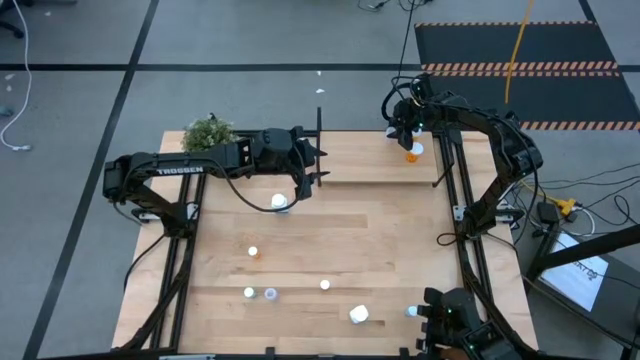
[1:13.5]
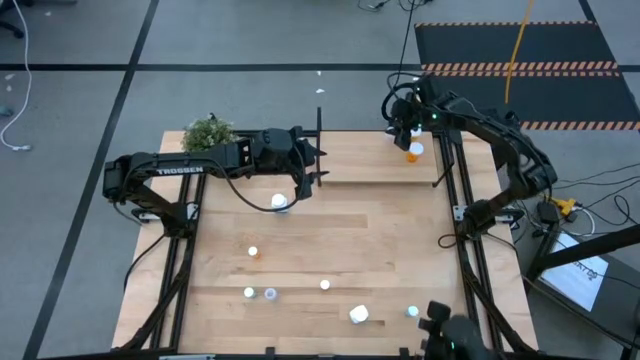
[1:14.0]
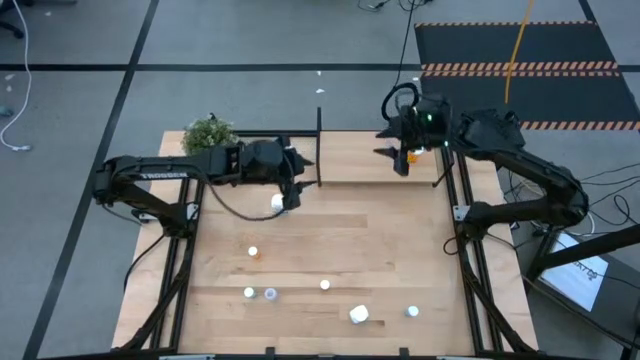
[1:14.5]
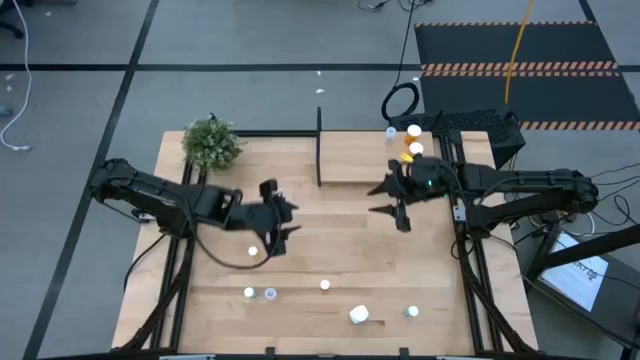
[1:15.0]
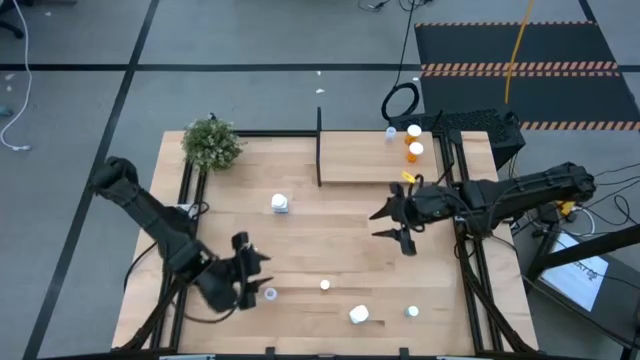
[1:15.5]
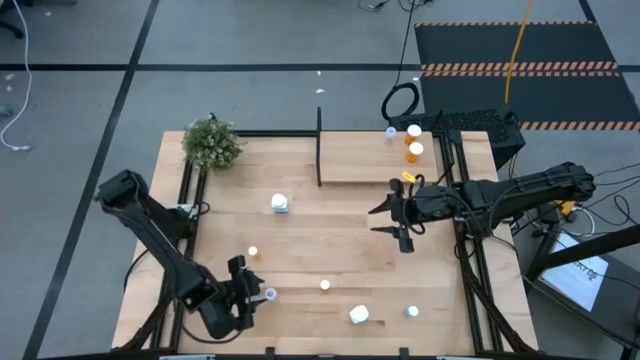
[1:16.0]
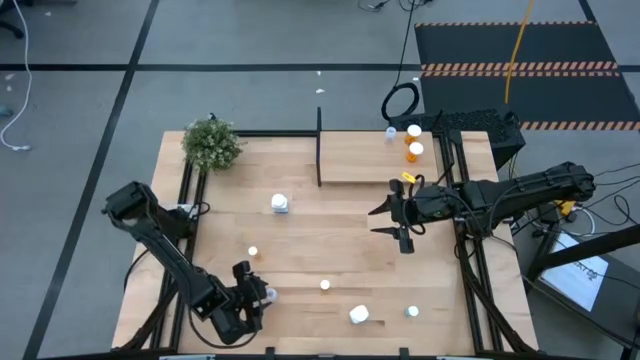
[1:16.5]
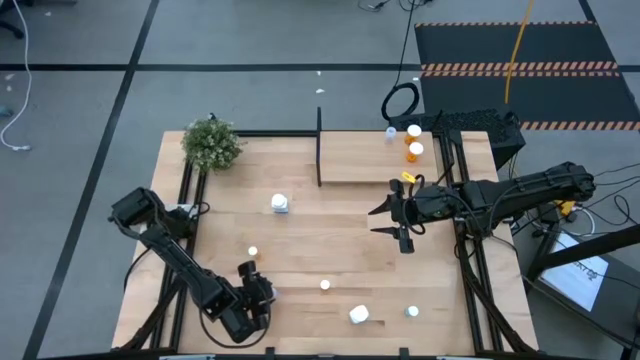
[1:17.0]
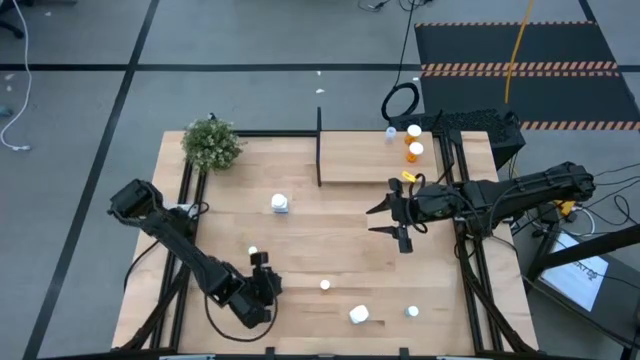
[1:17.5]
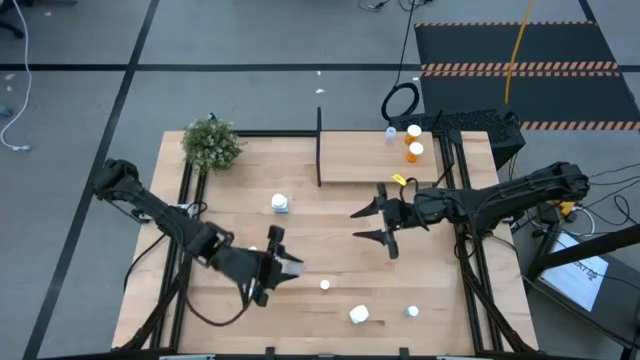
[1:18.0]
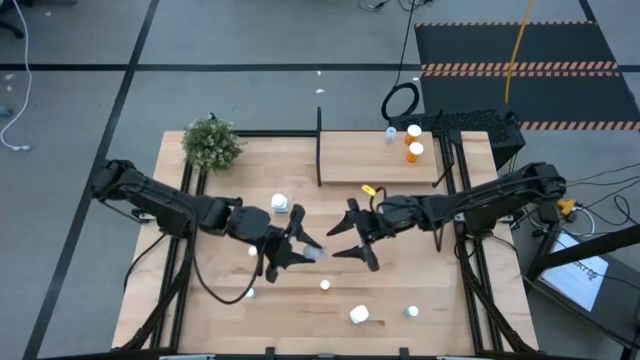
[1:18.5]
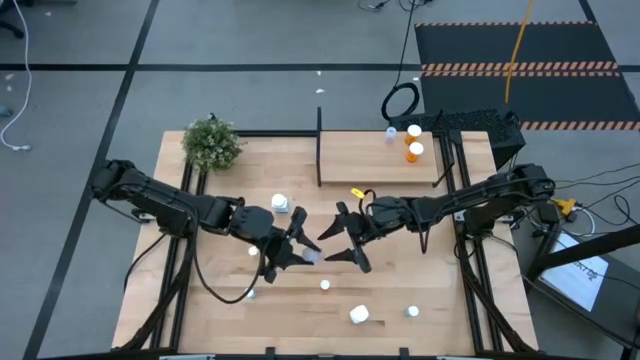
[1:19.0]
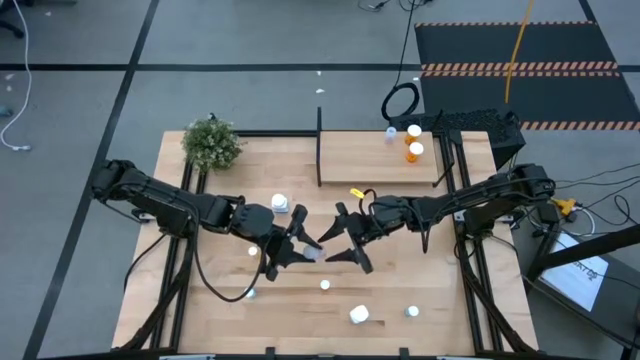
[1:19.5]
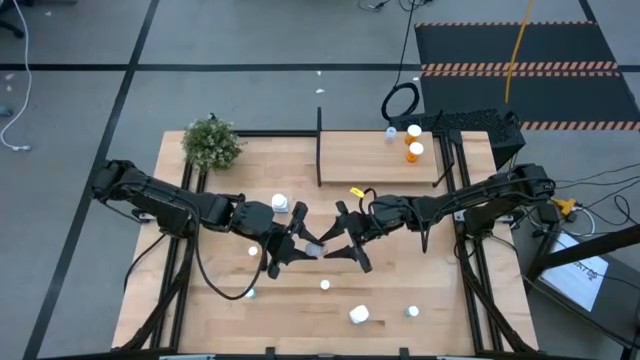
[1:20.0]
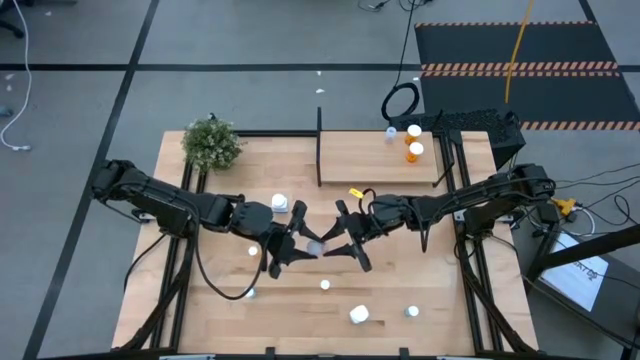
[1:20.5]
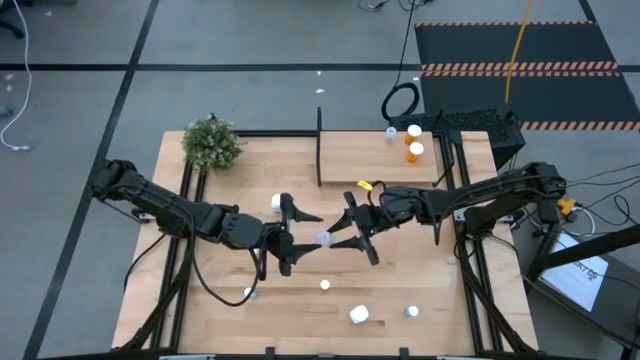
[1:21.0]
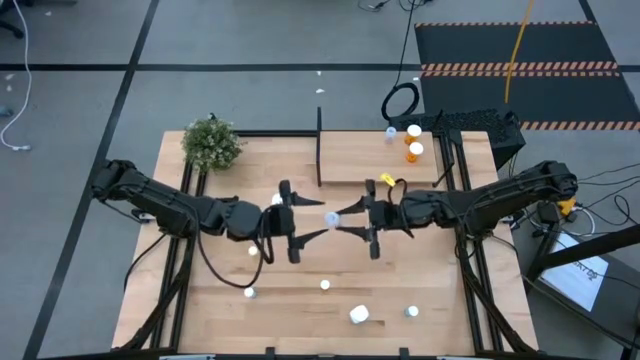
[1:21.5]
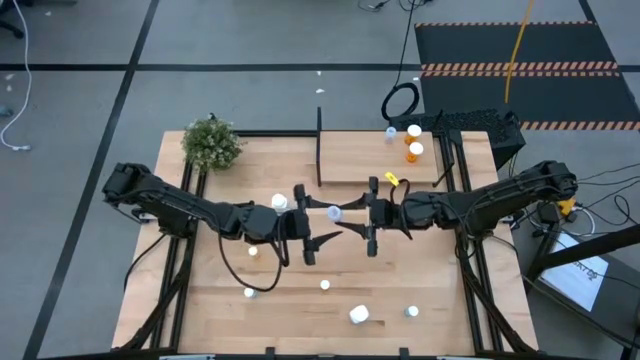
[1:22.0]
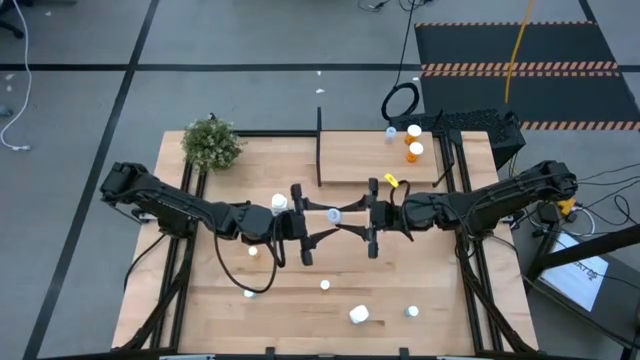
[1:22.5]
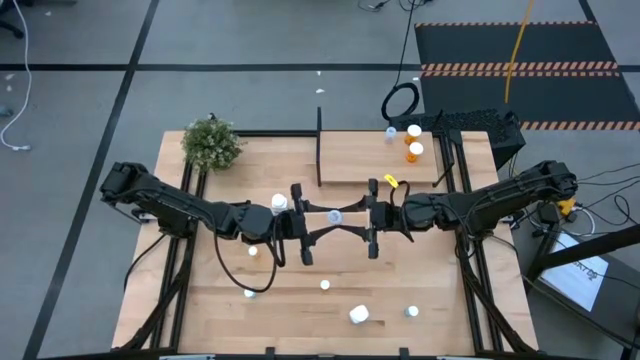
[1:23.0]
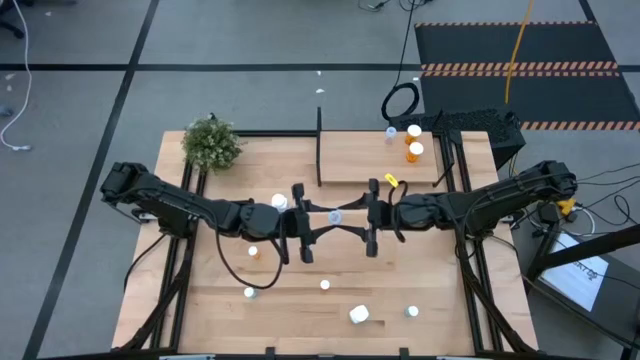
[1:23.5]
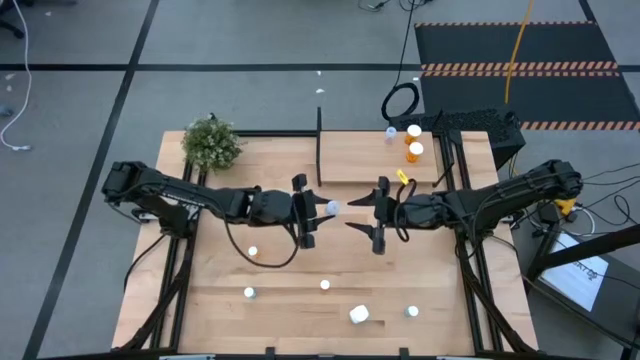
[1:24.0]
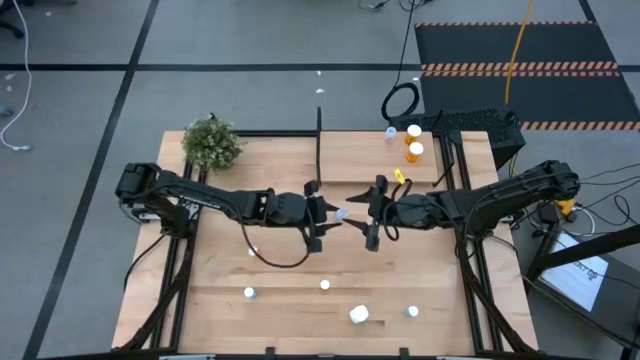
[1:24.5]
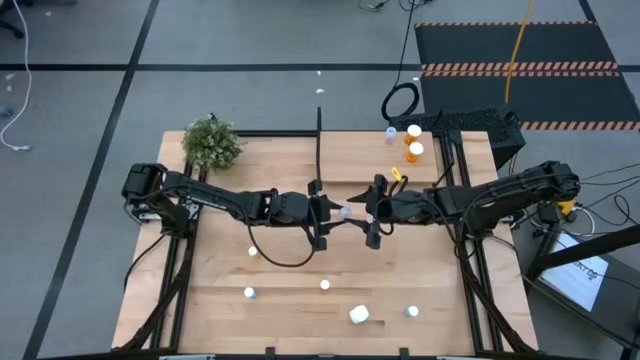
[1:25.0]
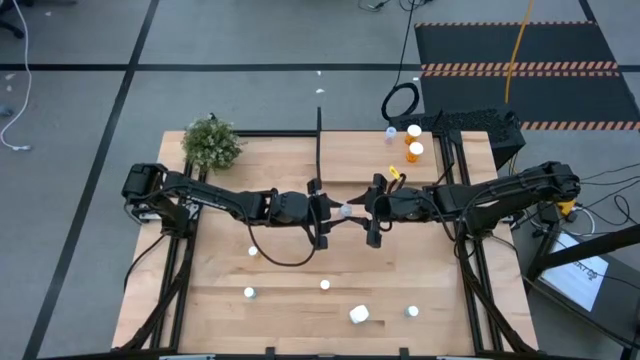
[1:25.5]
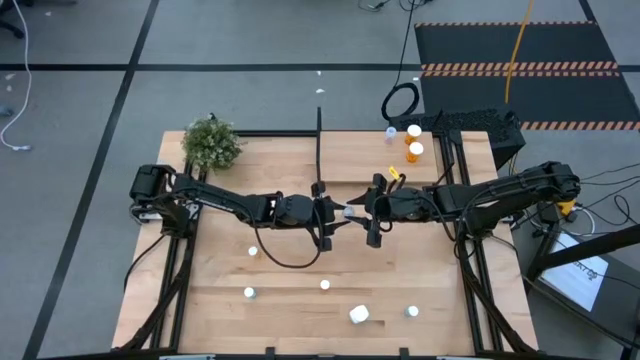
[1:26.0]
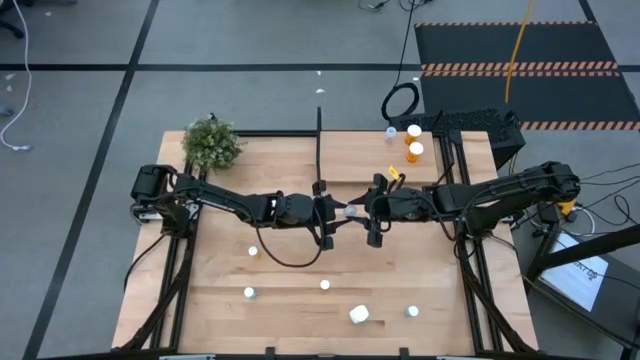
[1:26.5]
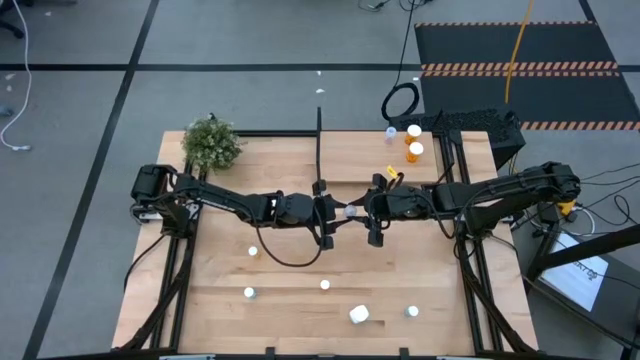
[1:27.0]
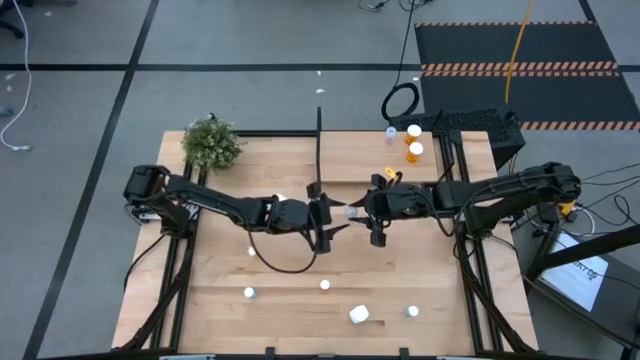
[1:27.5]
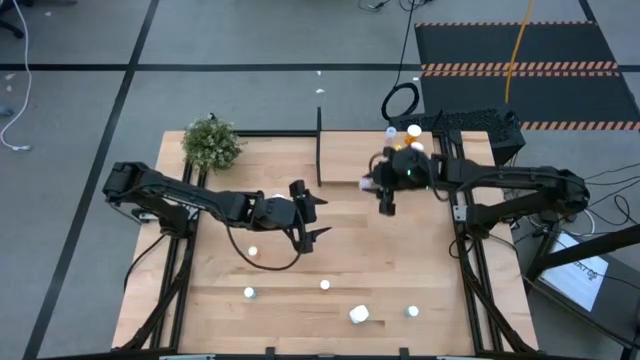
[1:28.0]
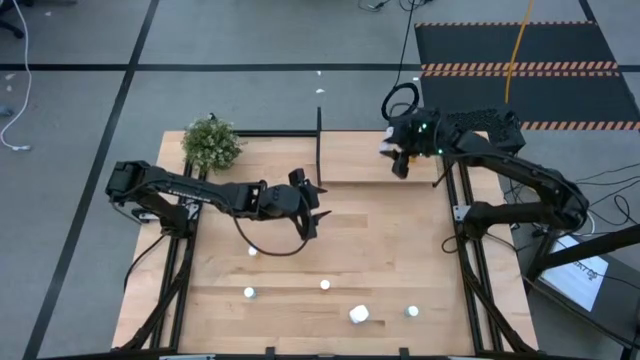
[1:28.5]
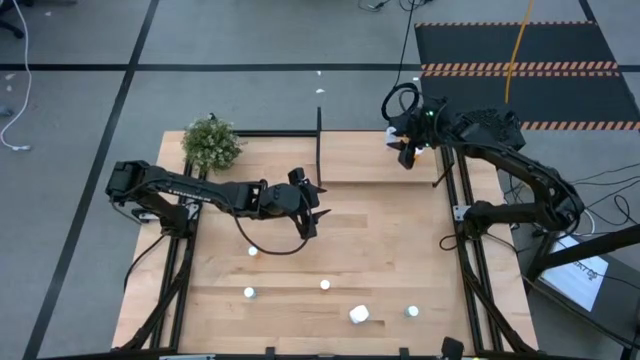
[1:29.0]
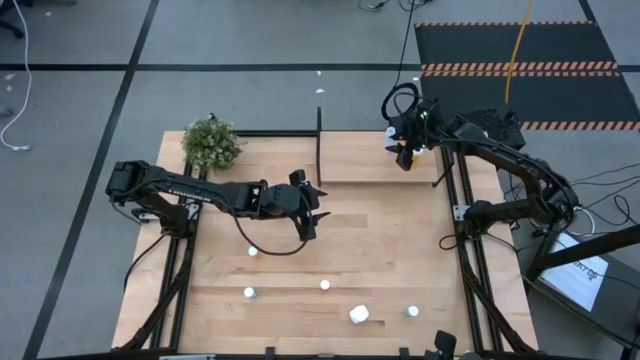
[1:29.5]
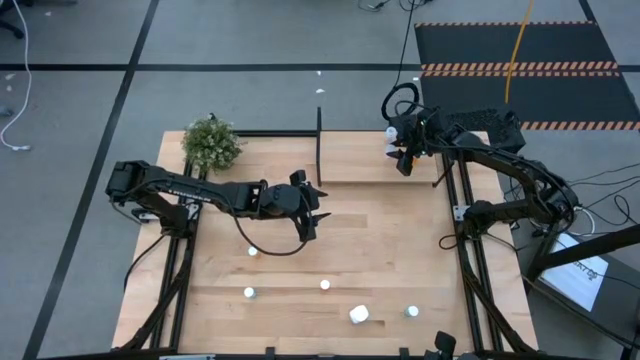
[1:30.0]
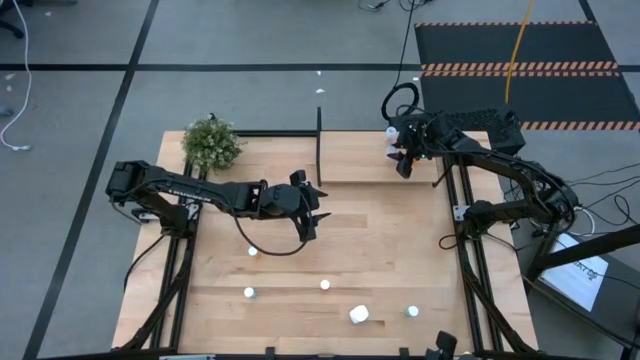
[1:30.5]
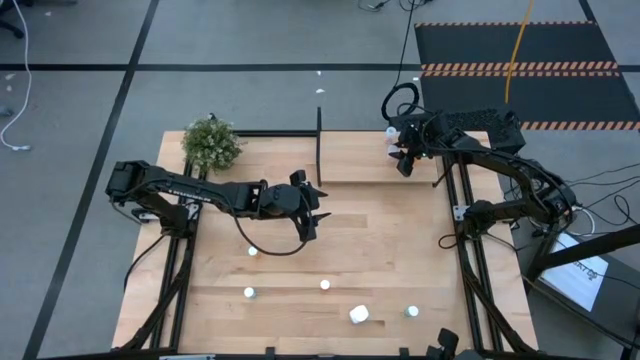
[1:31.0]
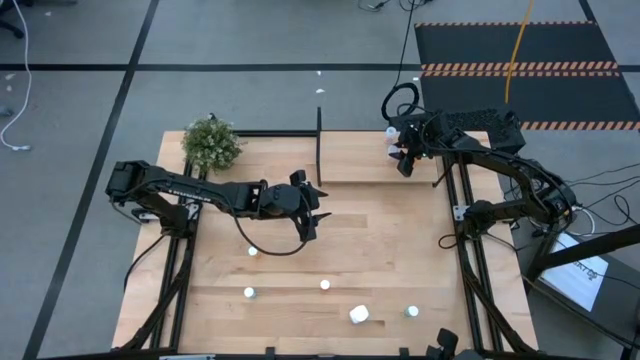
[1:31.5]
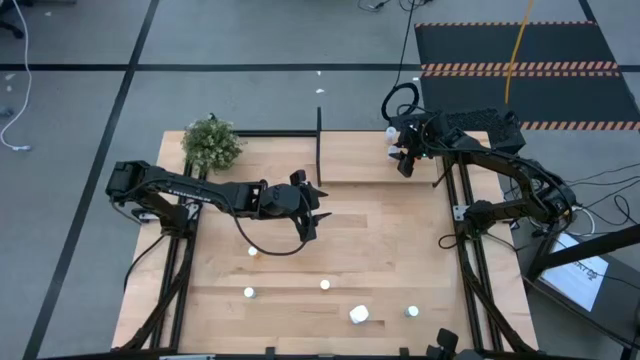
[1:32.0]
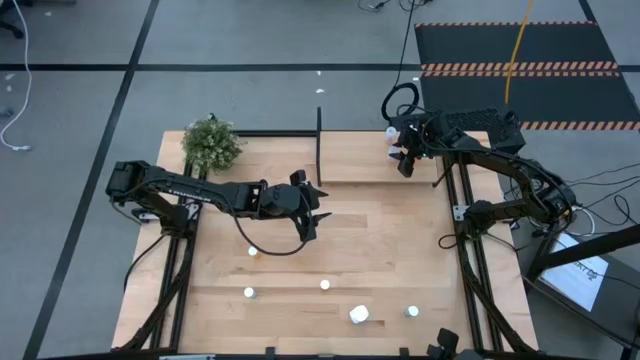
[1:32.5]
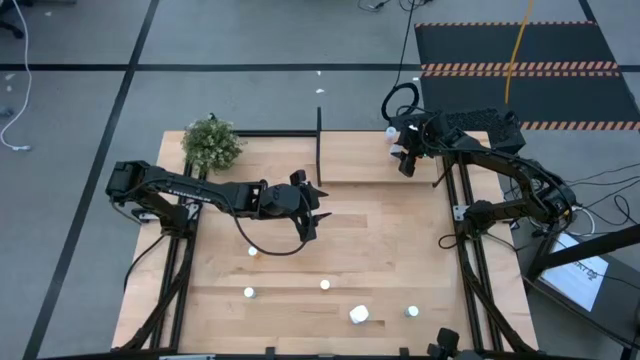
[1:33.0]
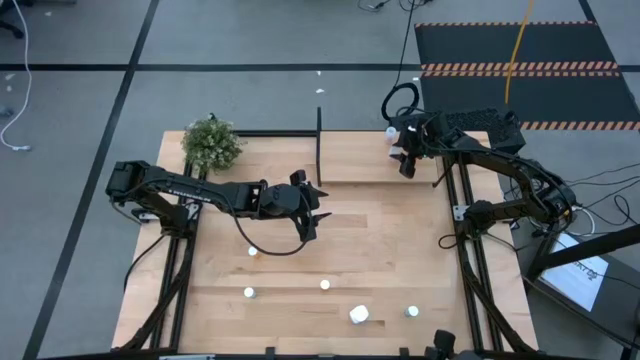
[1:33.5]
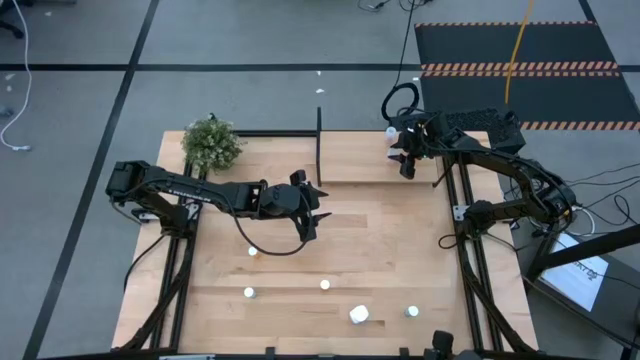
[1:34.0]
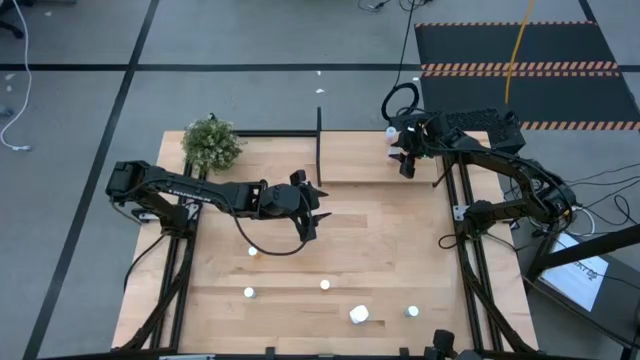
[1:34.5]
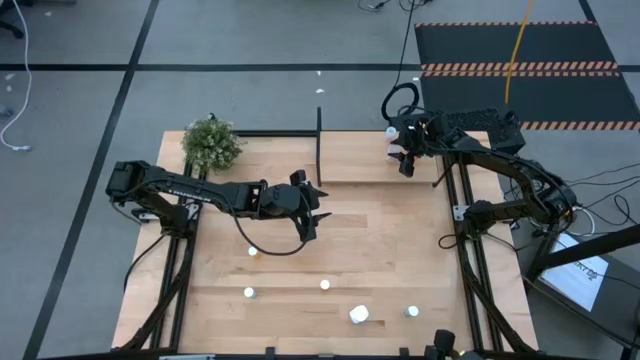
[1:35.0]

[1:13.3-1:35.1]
Task: Pick and place medicine bottles onto shelf by color
Put the transparent pill bottle on the shelf aligned with the other transparent pill bottle
